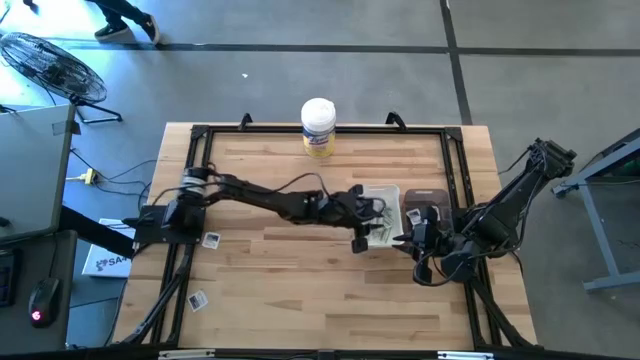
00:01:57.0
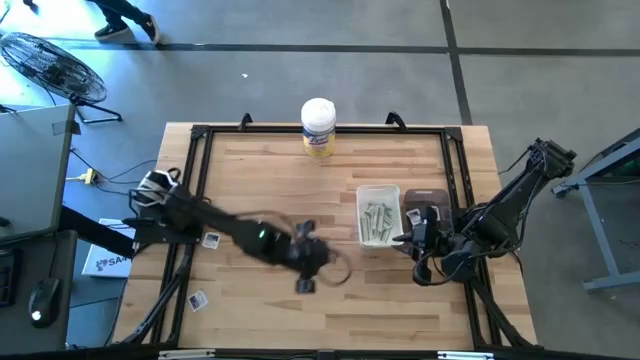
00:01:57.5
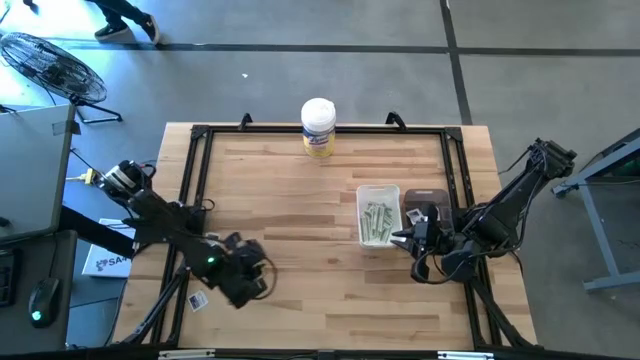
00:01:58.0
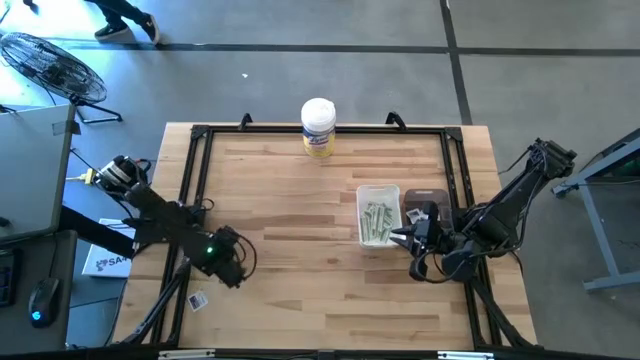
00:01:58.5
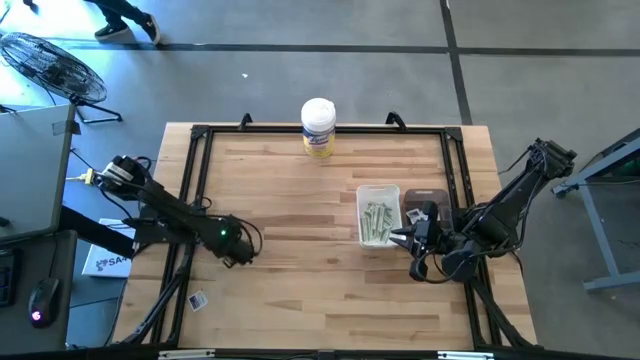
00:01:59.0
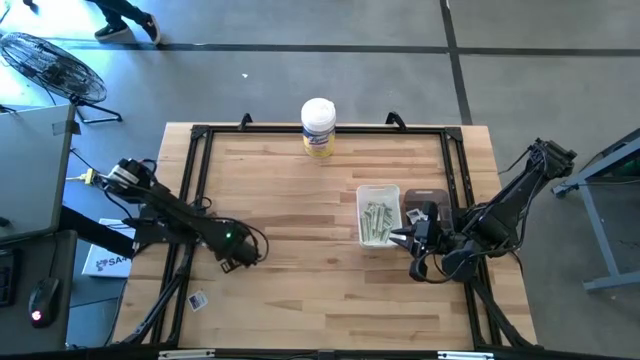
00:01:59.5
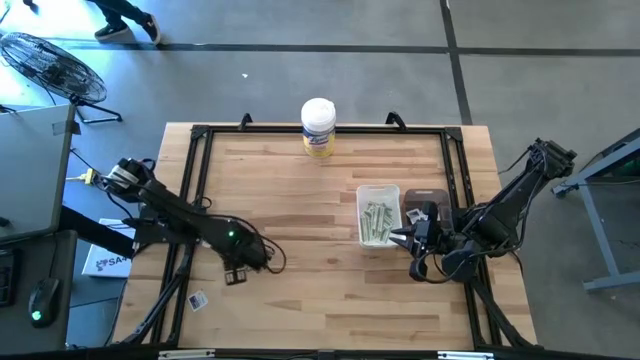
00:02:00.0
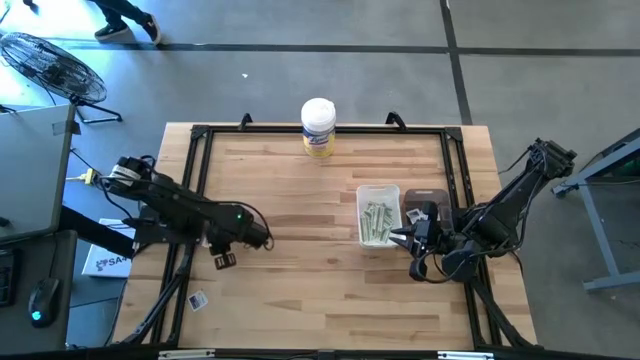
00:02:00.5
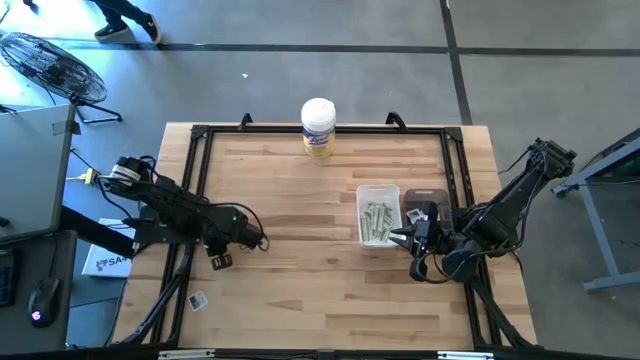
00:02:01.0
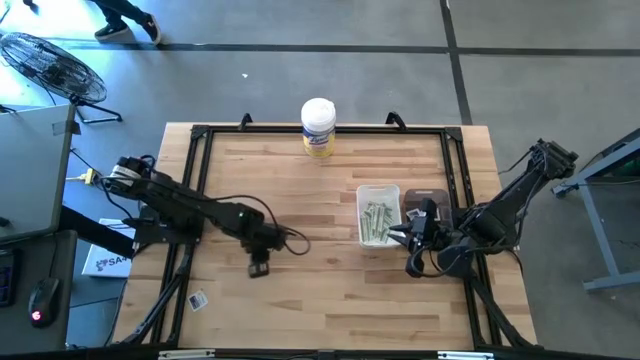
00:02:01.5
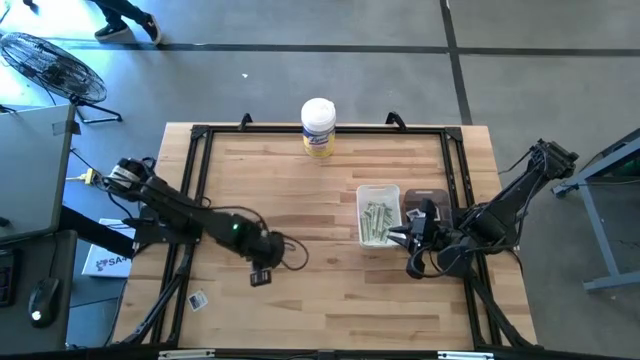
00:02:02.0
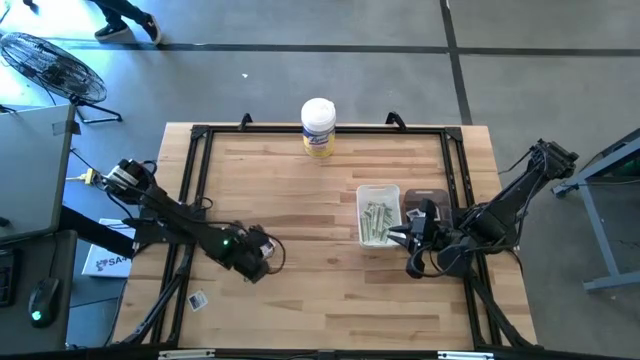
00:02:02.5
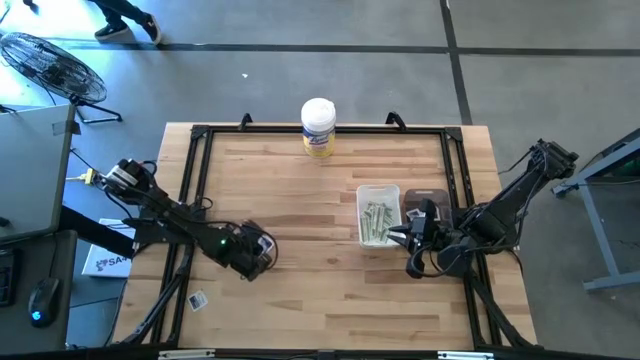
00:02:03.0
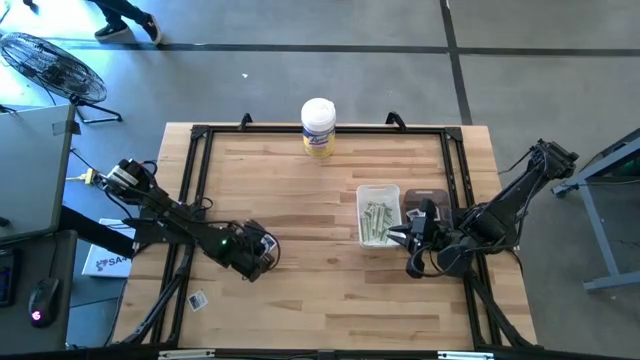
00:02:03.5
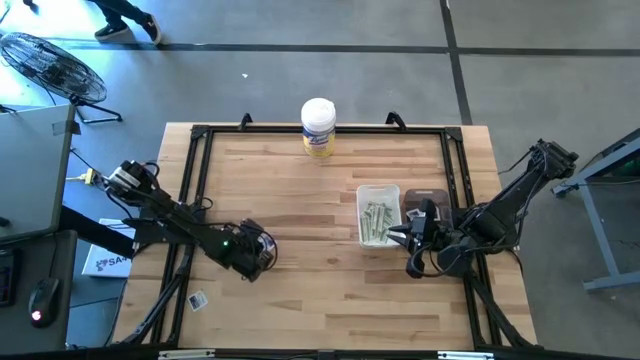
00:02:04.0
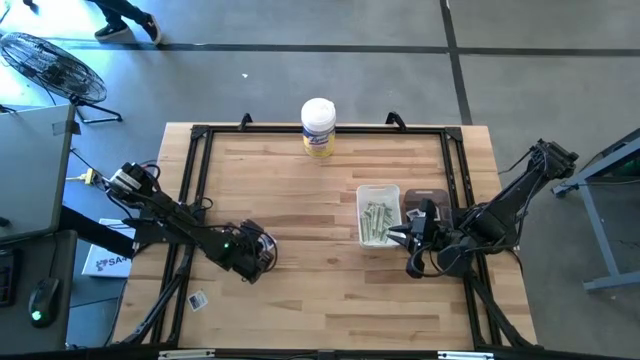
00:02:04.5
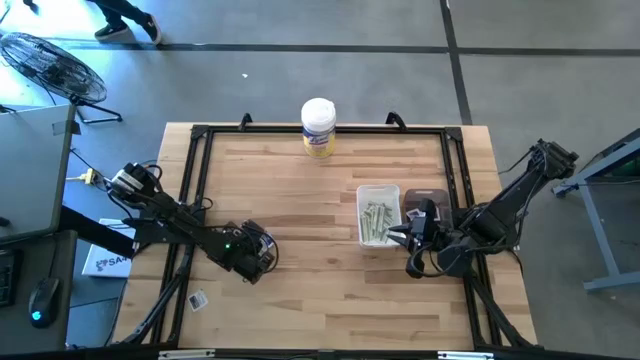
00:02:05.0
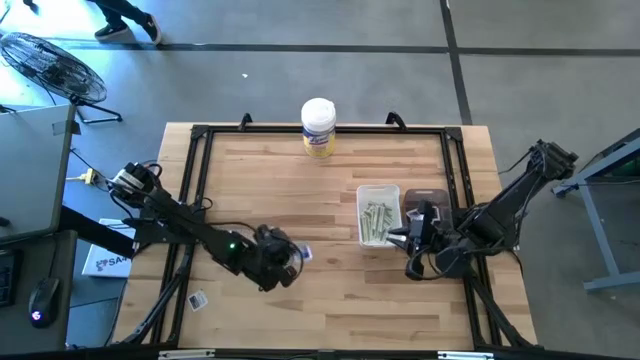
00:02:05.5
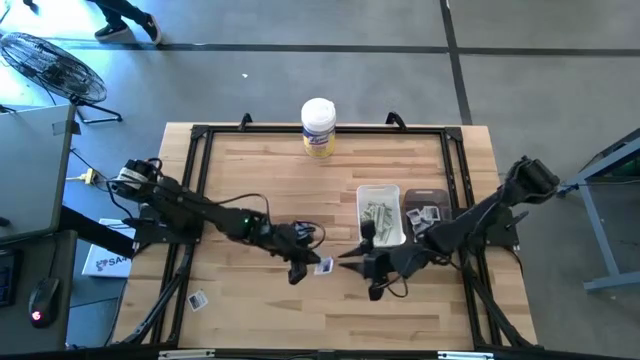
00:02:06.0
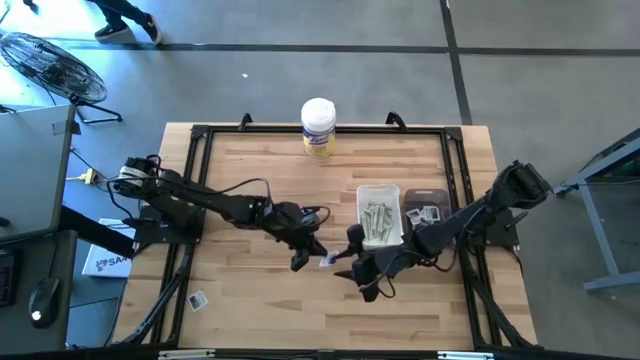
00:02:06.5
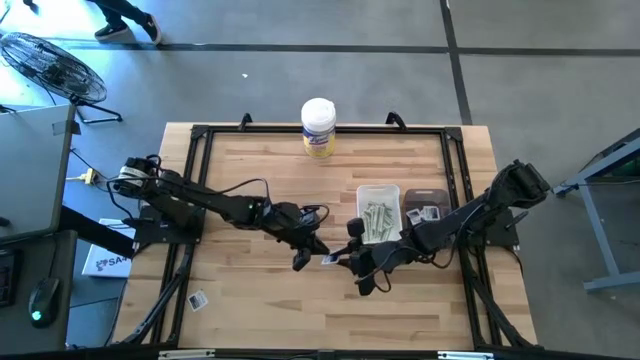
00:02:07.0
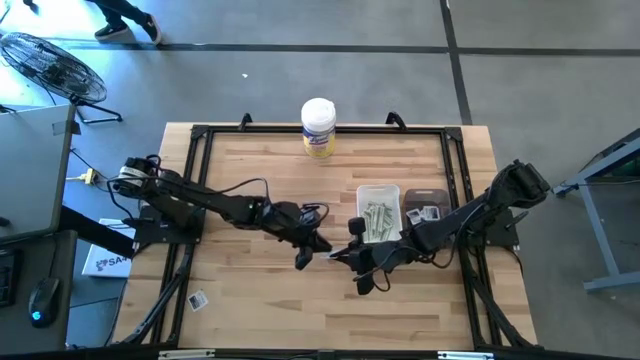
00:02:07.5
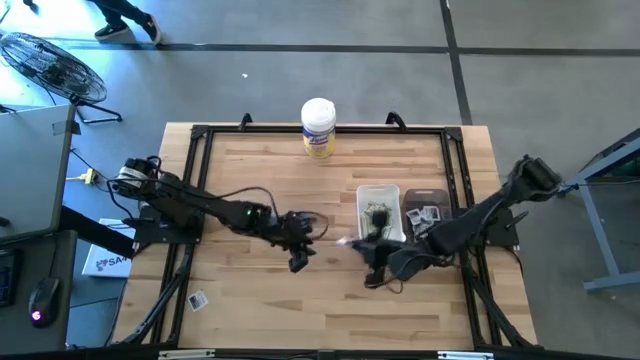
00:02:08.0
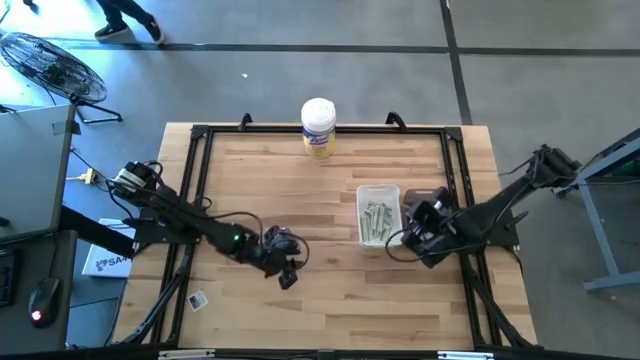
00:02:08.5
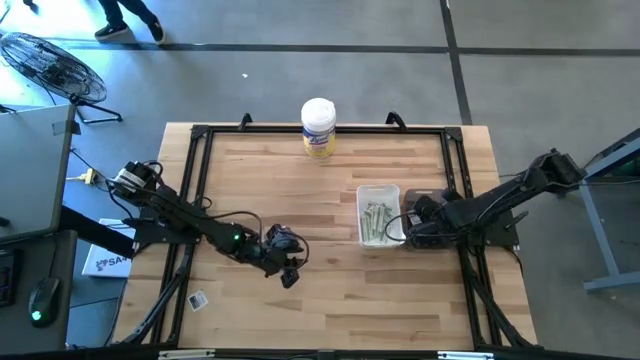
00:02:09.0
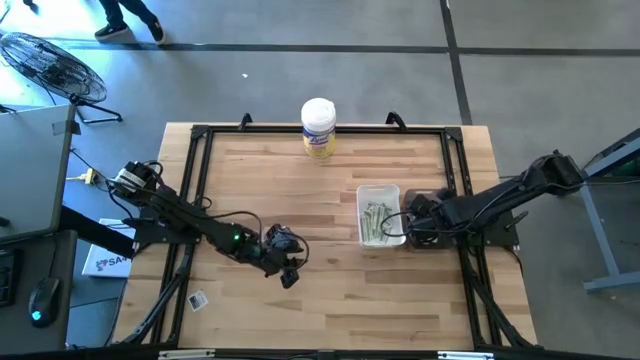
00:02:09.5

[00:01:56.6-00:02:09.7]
Task: Pick & Place First Aid Supplies
Put the blue alcohol pad into the black bin

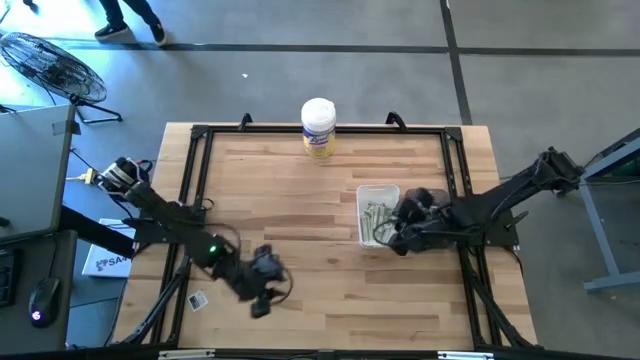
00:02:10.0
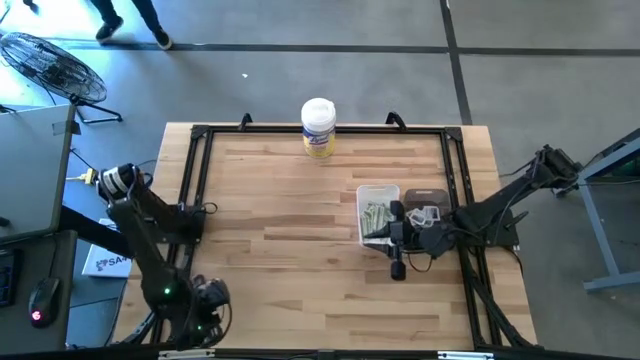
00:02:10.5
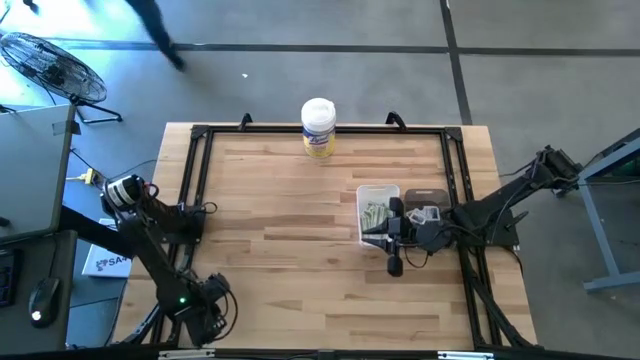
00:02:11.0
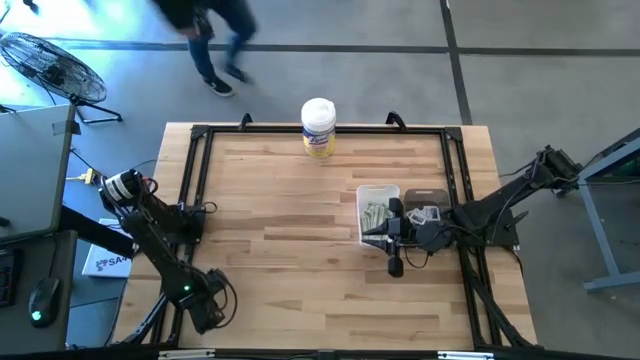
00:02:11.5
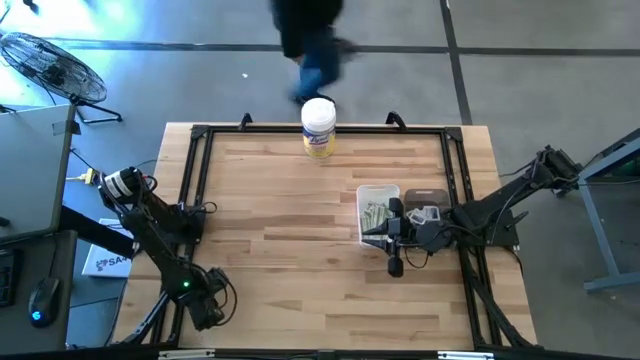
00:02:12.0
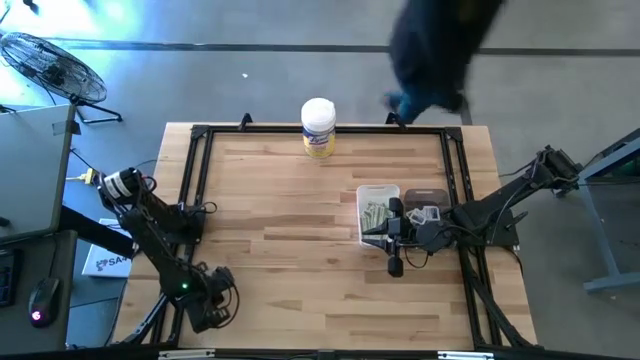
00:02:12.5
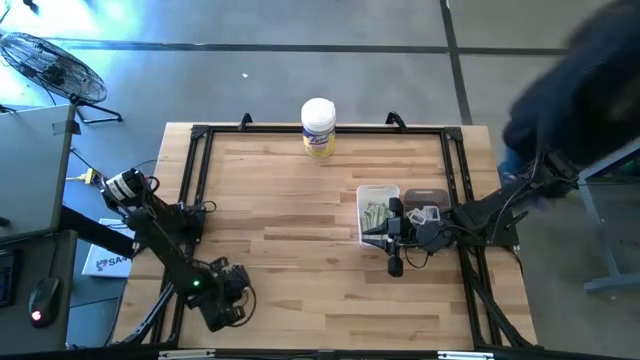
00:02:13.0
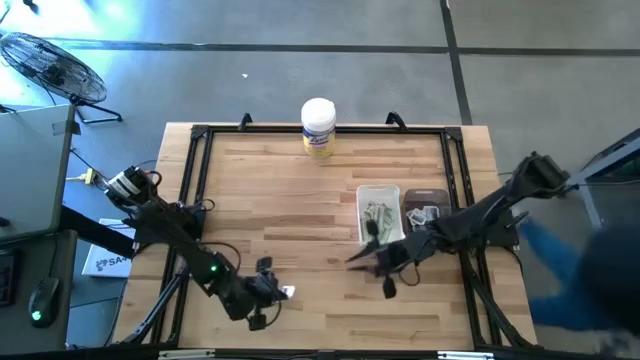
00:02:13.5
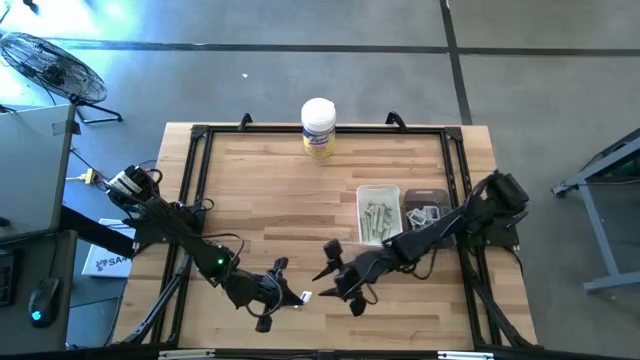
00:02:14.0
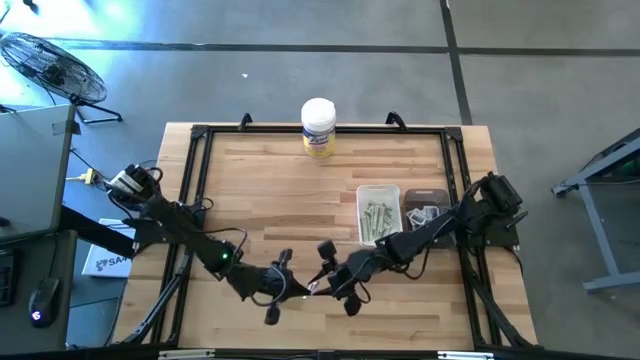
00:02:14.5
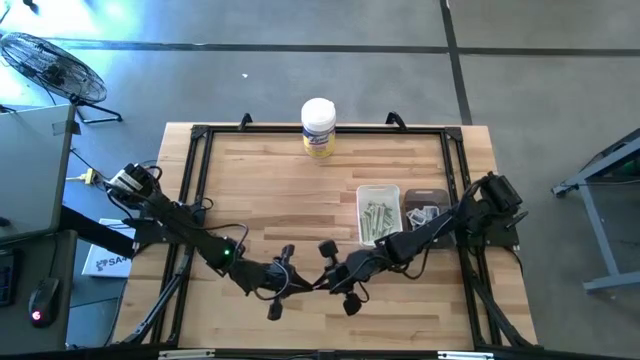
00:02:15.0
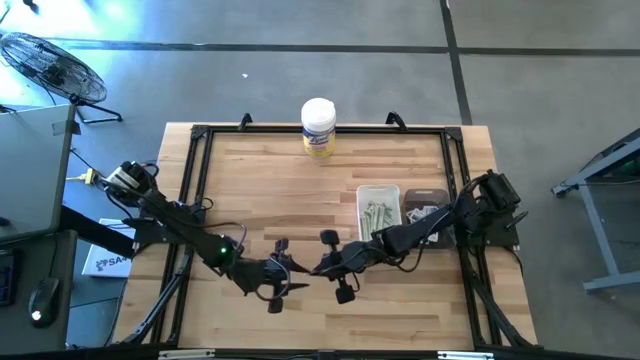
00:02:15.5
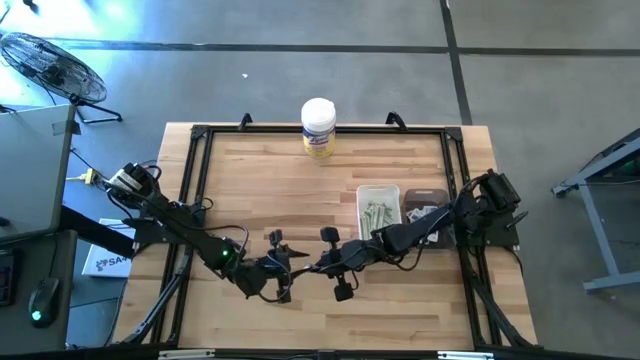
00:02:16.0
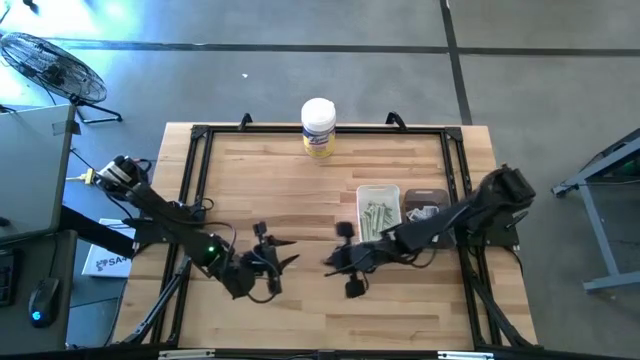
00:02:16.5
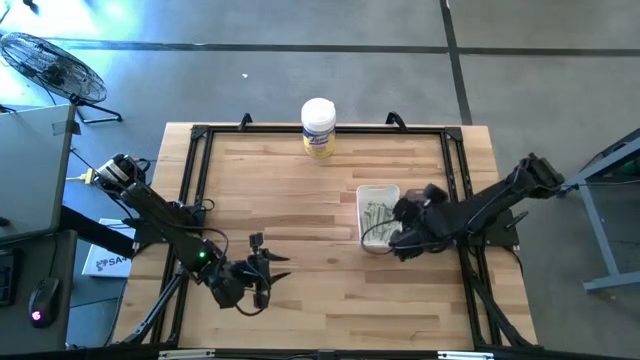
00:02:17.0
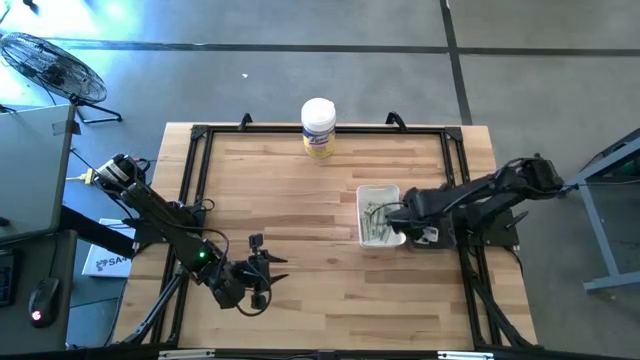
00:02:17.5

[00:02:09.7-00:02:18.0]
Put the blue alcohol pad into the black bin

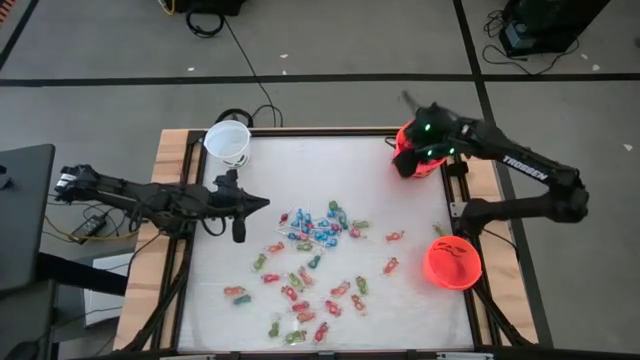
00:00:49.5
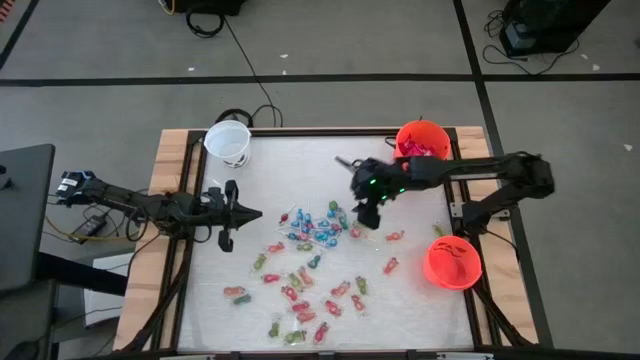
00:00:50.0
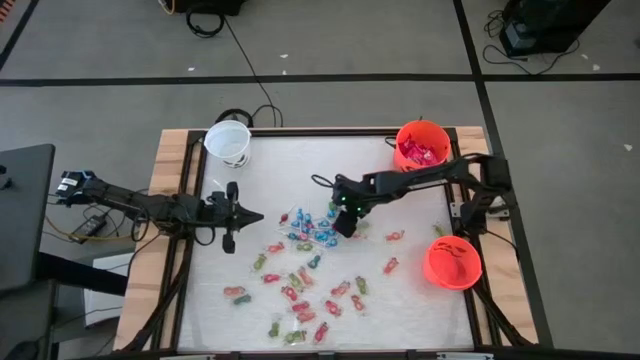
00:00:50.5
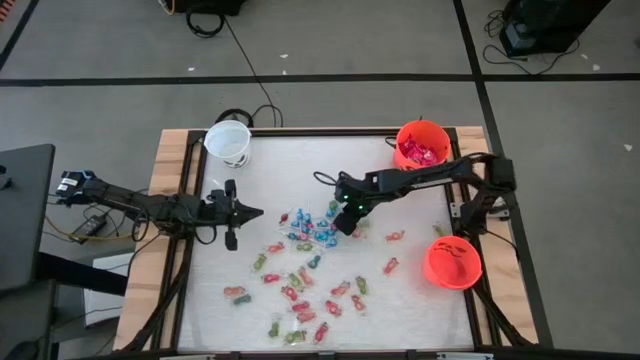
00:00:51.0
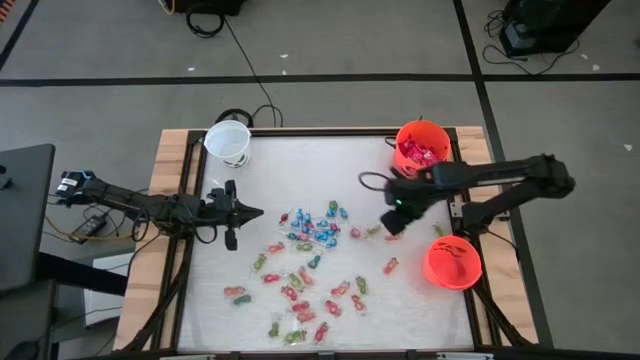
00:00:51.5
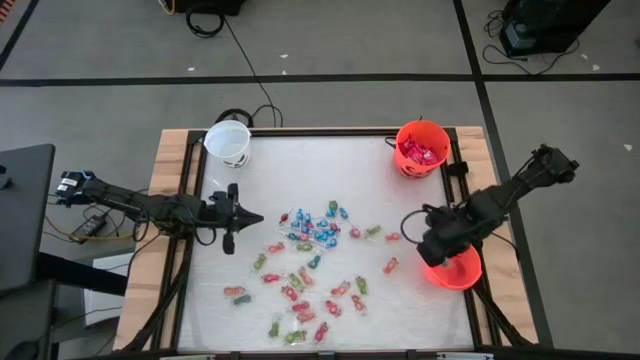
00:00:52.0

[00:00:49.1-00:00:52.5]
Task: Sort candy by brand, put in halloween buckets
Put the blue gummy into the bottom orange bucket
